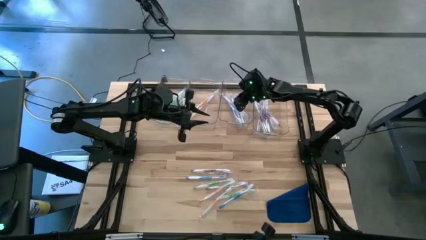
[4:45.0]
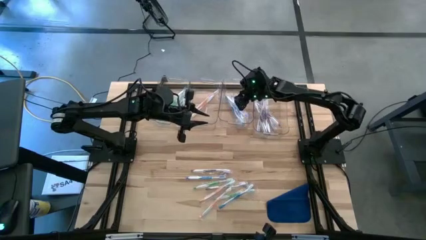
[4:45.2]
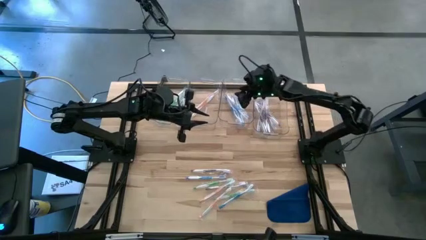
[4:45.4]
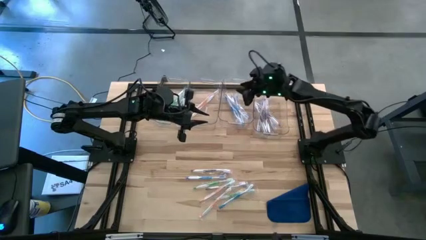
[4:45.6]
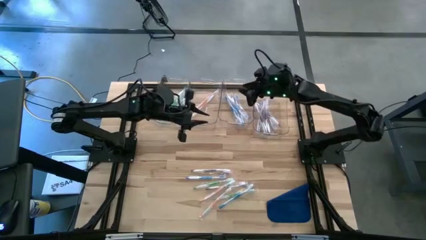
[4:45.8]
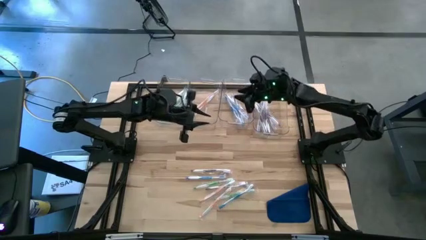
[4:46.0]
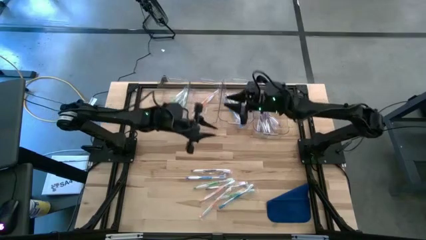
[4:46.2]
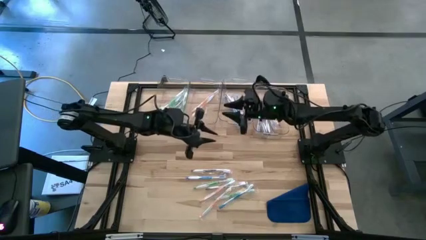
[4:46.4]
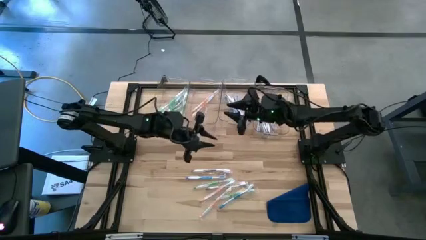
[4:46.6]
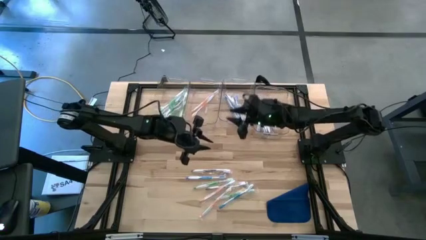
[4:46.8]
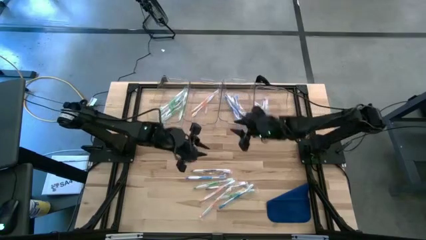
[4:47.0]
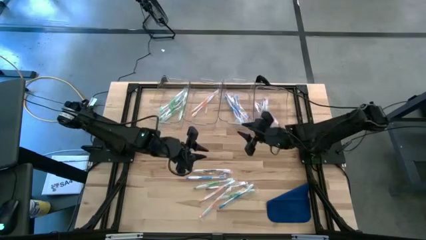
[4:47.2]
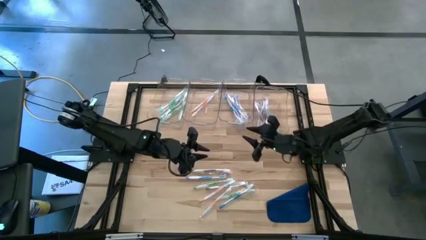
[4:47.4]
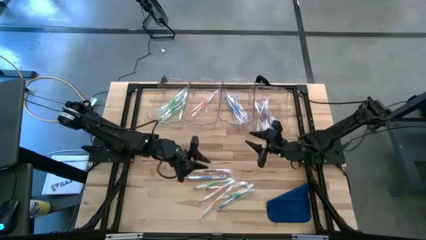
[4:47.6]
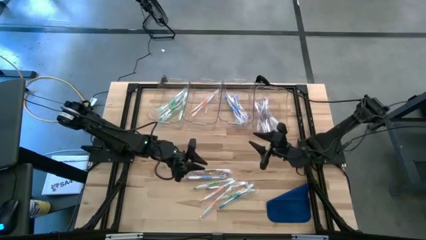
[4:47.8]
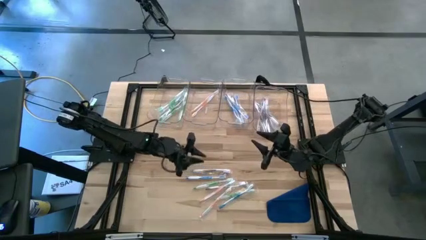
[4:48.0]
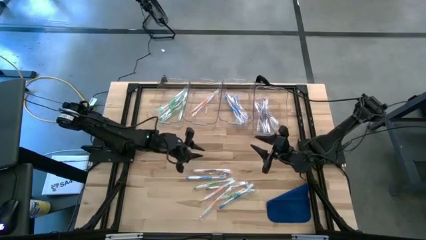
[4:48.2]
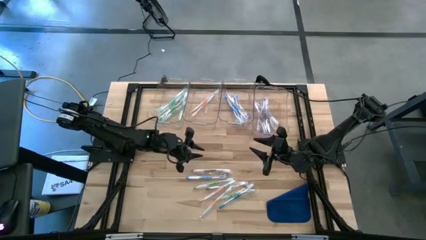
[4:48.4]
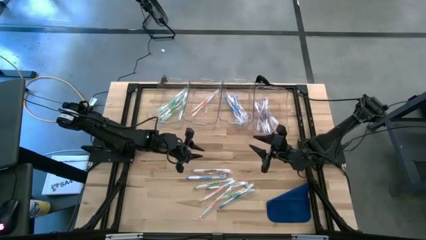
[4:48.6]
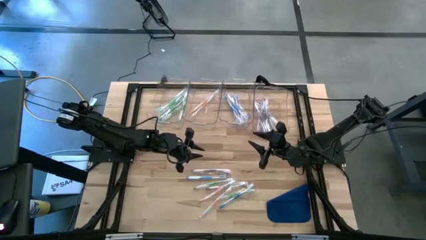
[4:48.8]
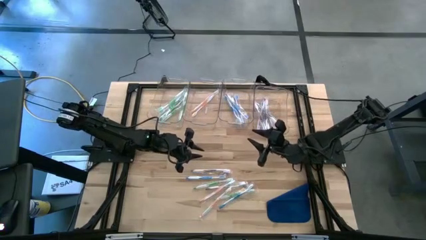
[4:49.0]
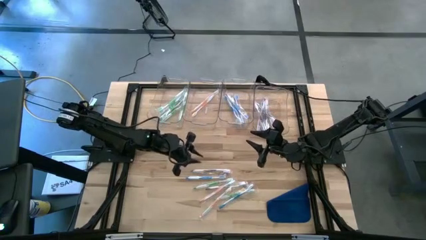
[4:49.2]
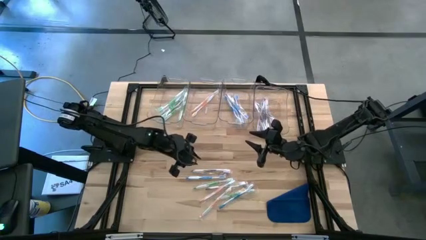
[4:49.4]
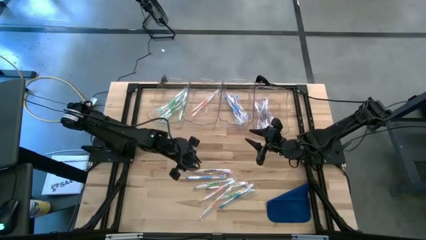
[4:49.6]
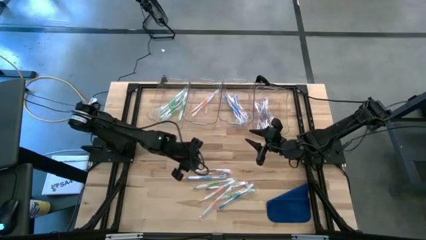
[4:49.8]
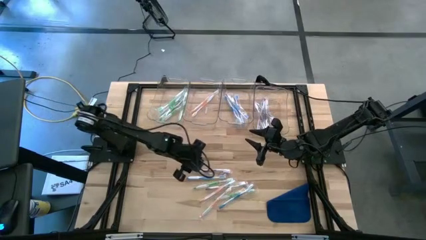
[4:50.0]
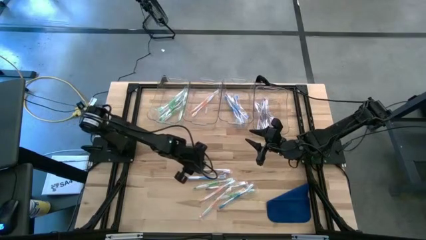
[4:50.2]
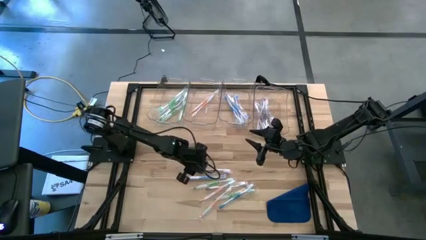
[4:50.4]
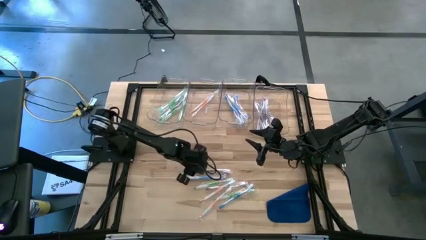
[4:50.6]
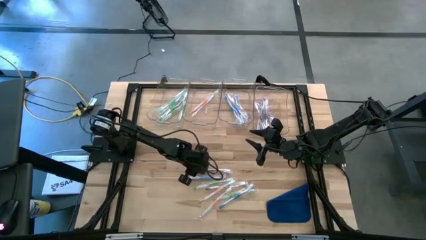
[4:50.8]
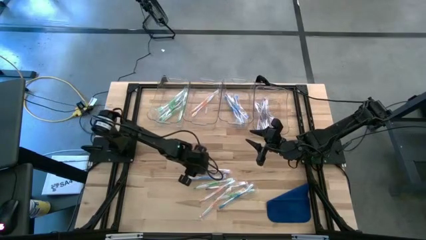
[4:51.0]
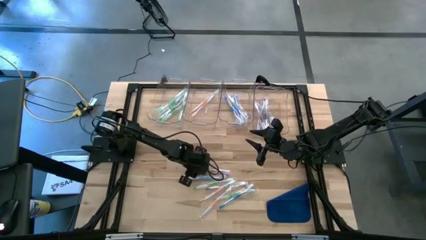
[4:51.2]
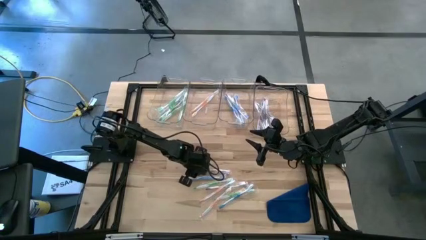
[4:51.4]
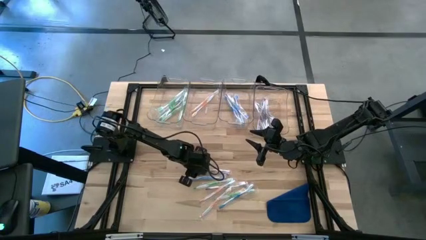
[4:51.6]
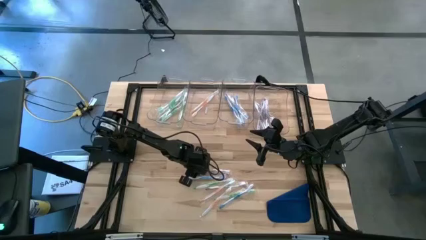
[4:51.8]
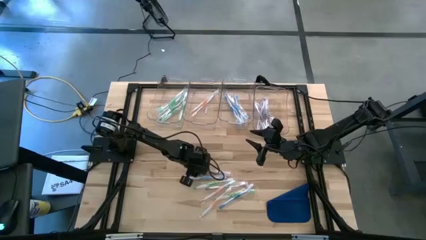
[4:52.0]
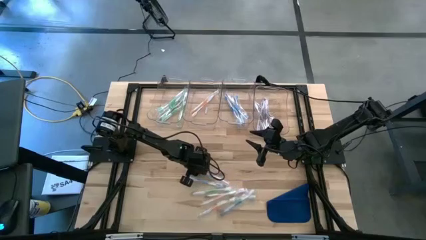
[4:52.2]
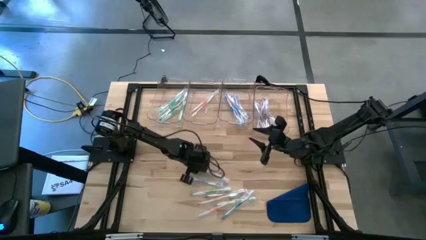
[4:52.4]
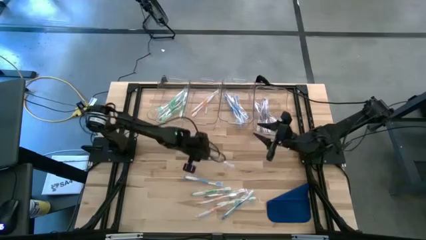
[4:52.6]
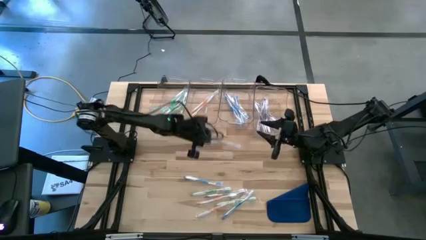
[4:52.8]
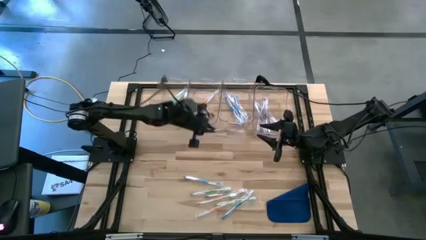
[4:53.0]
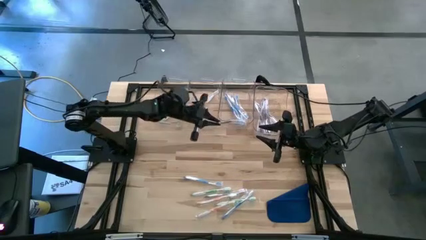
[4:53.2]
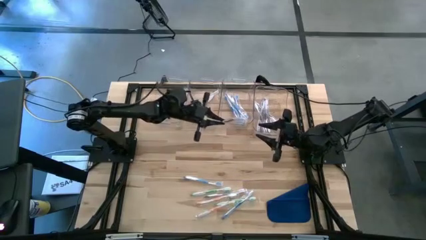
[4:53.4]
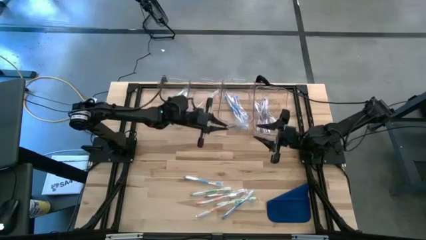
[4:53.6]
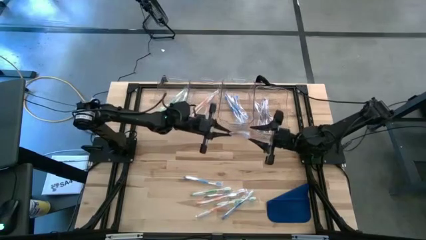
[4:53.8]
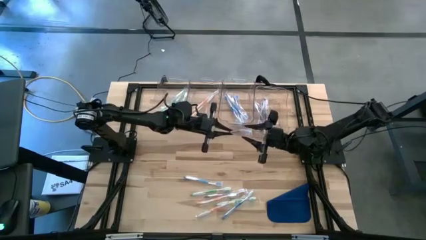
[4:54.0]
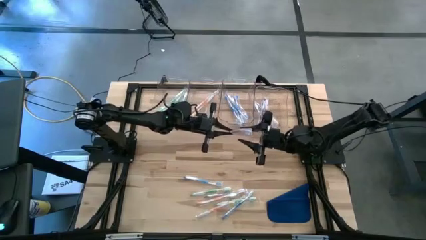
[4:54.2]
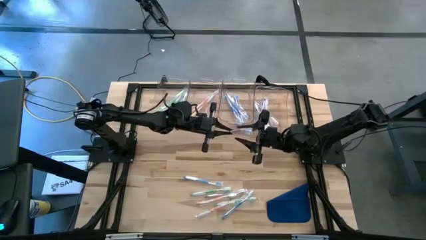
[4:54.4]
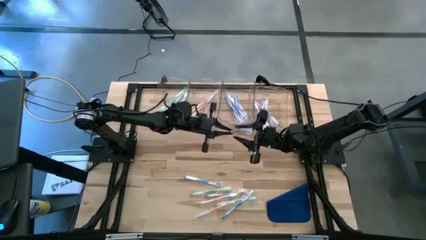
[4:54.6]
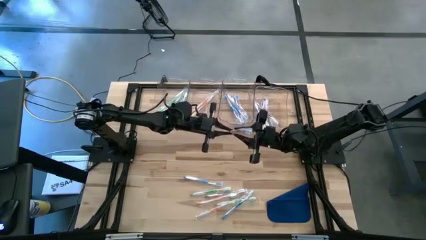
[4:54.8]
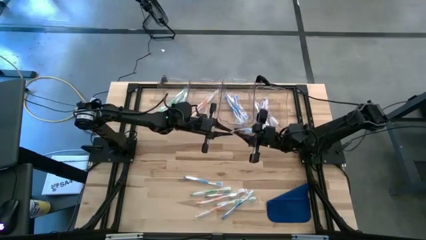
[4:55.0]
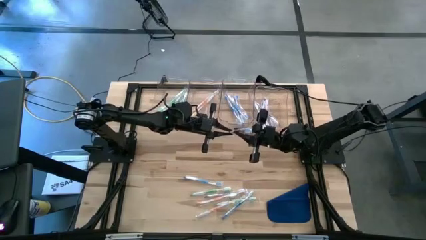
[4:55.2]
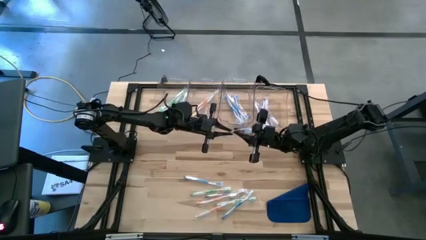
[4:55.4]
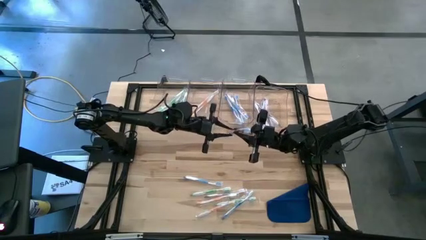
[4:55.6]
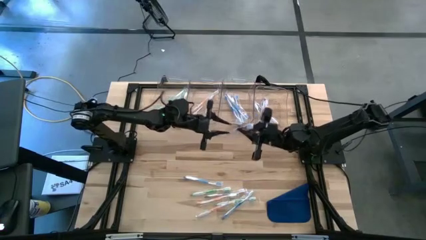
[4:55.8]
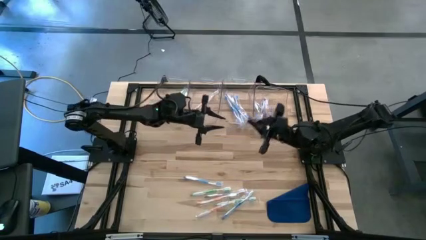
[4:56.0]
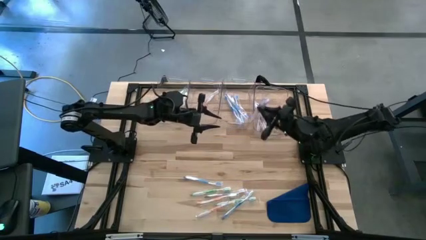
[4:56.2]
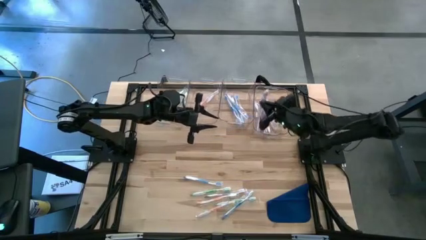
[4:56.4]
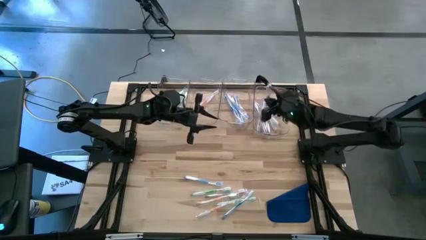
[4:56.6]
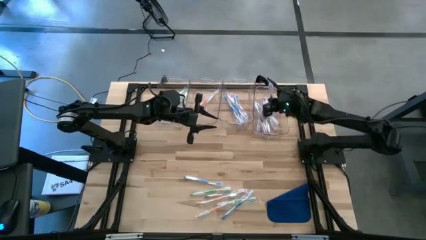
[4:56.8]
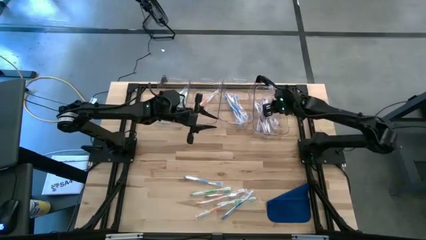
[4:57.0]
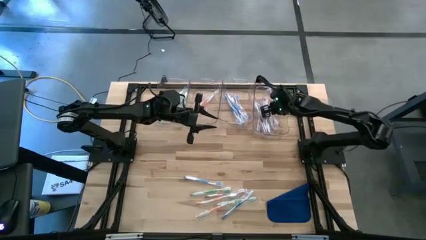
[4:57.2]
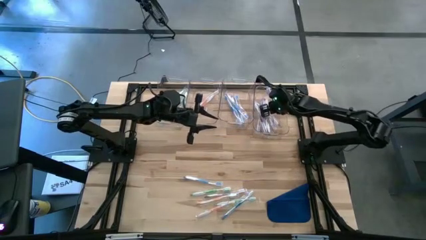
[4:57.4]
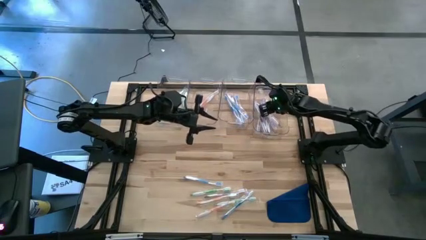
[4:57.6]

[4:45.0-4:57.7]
Task: Pick & Place Toothbrushes
Put the violet toothbrush into the right transparent bin

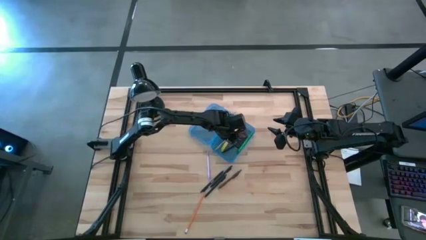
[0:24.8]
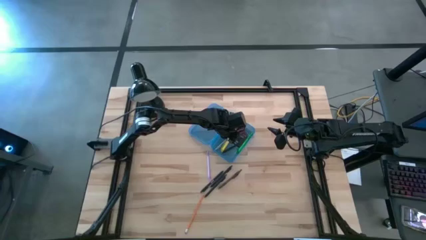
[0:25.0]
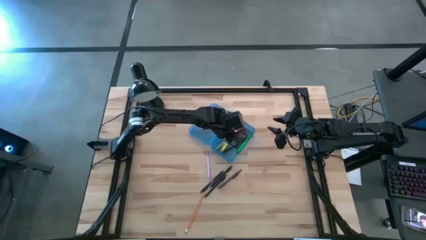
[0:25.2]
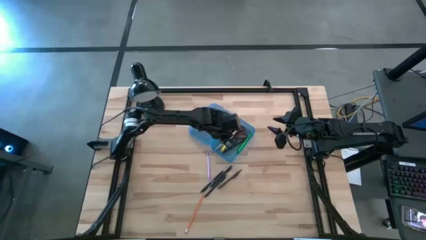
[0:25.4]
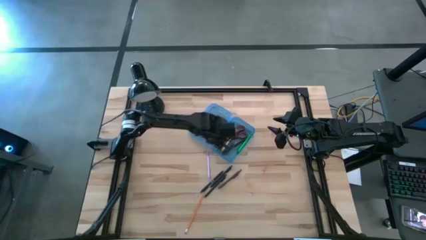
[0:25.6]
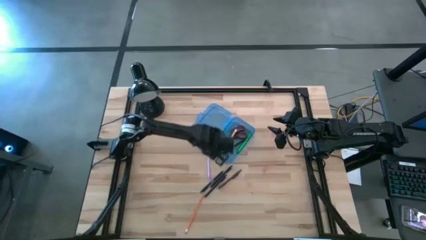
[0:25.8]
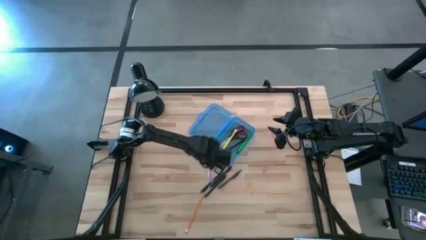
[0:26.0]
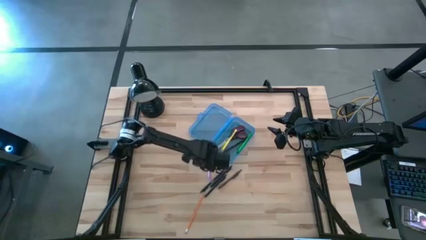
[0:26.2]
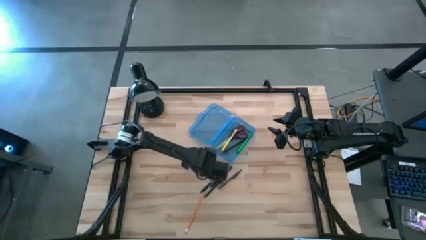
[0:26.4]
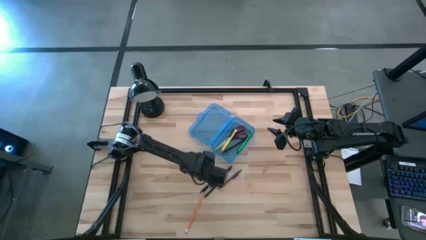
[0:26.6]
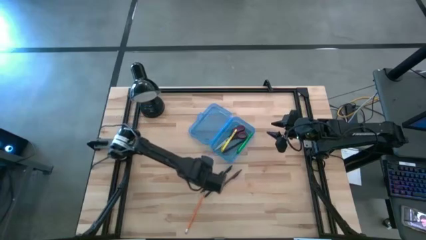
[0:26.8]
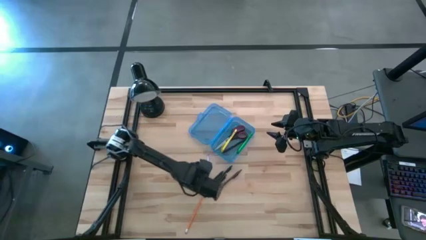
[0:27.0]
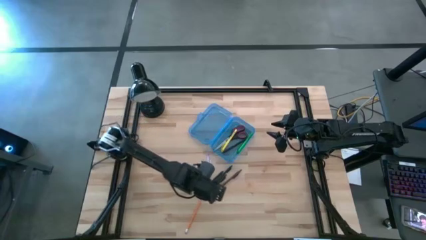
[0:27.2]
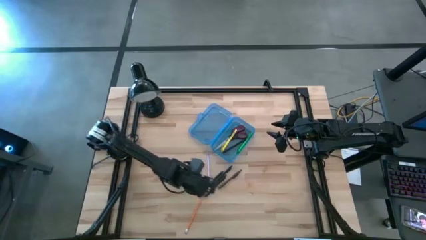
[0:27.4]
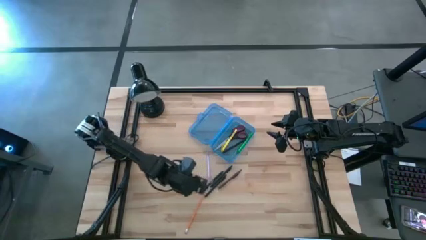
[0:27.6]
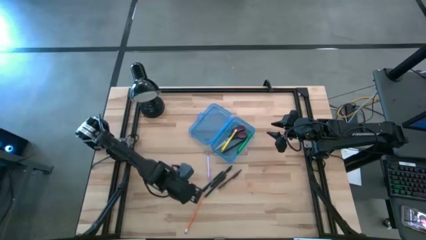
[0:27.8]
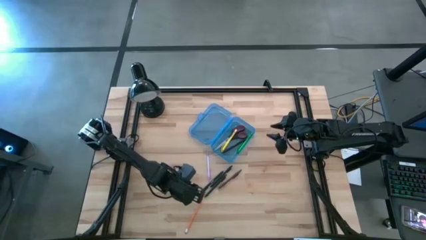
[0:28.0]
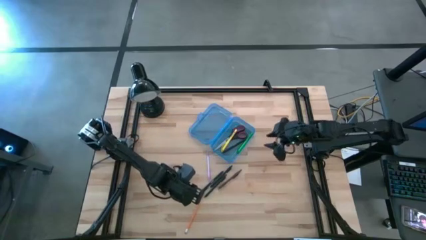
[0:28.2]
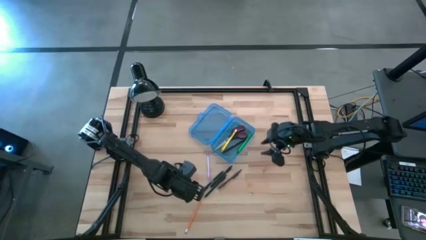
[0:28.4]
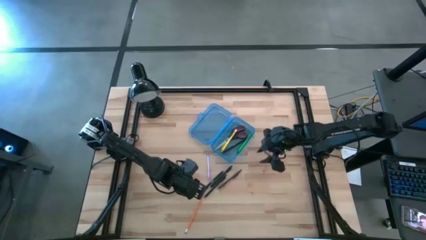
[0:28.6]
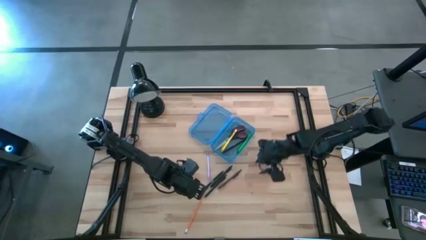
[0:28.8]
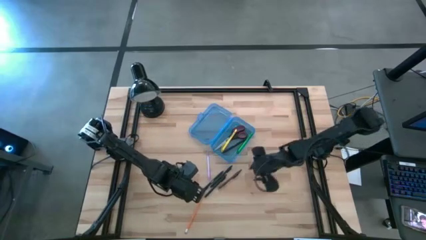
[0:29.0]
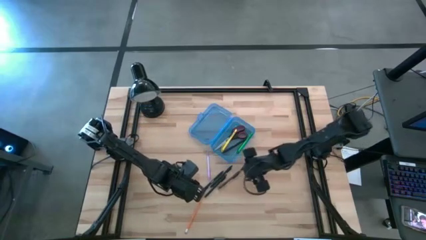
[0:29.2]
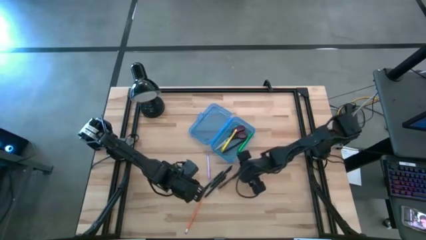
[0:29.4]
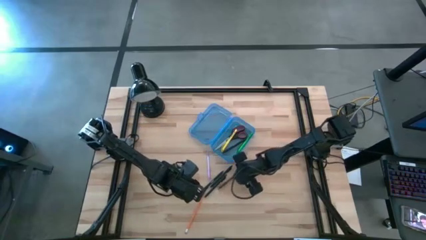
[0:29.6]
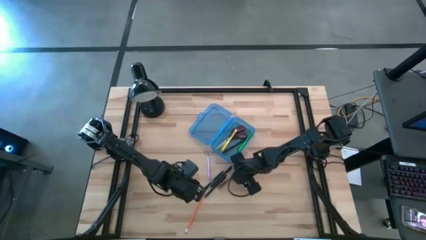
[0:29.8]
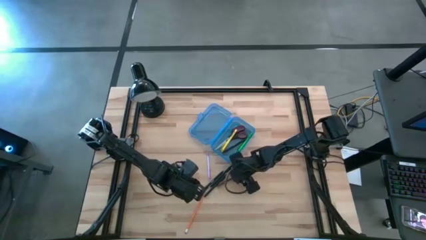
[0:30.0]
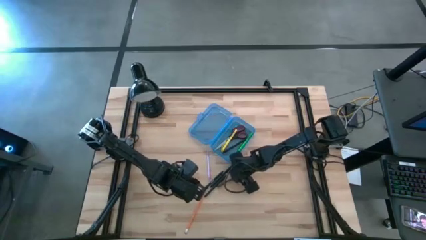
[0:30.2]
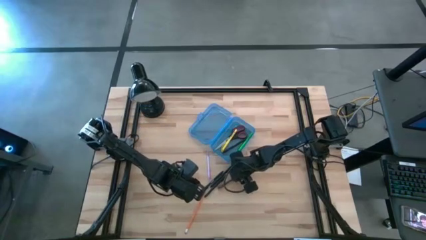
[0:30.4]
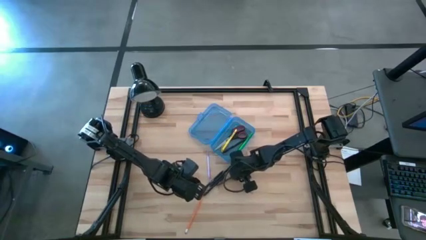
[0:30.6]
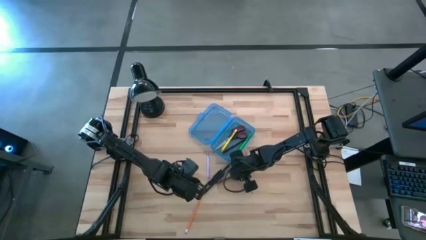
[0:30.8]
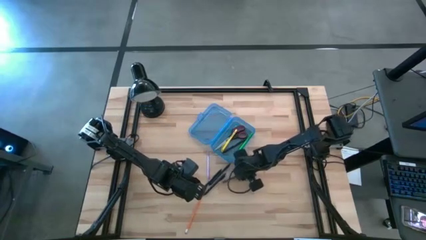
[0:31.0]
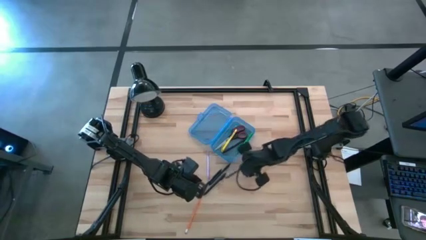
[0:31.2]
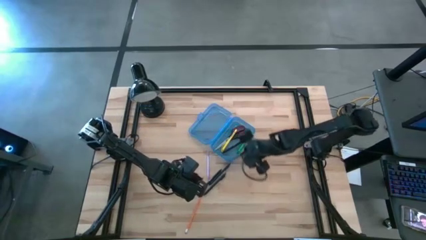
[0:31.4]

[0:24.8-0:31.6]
Task: Pick & place school supplies into a supply box
Put the brown pen into the blue supply box
